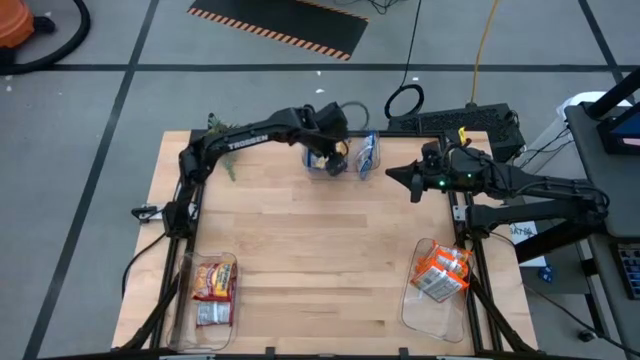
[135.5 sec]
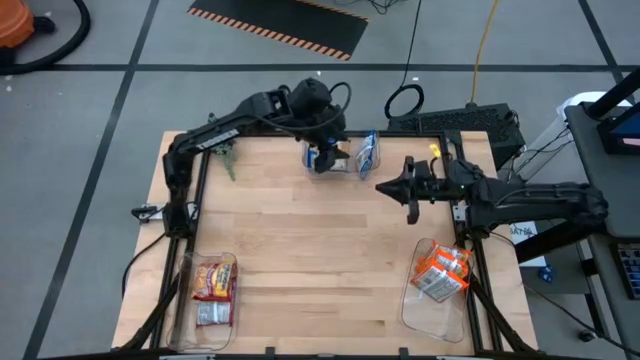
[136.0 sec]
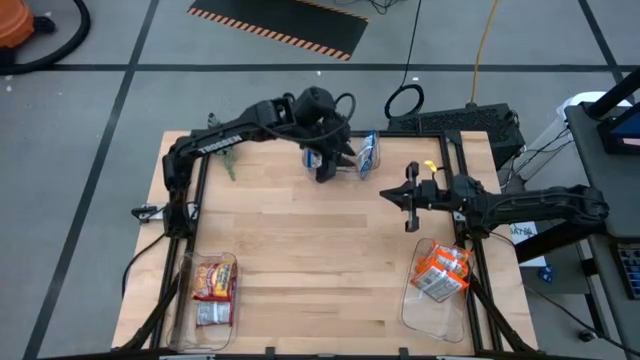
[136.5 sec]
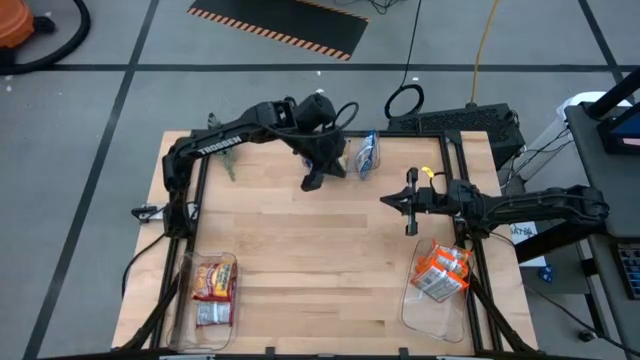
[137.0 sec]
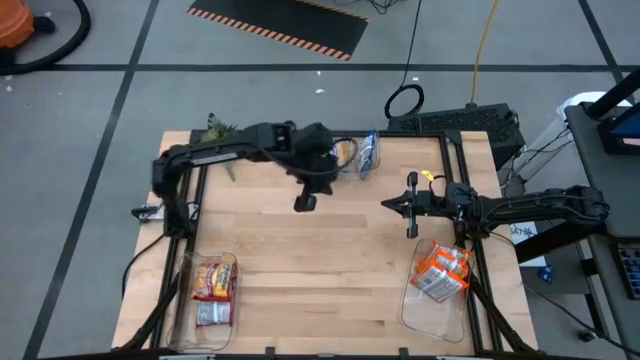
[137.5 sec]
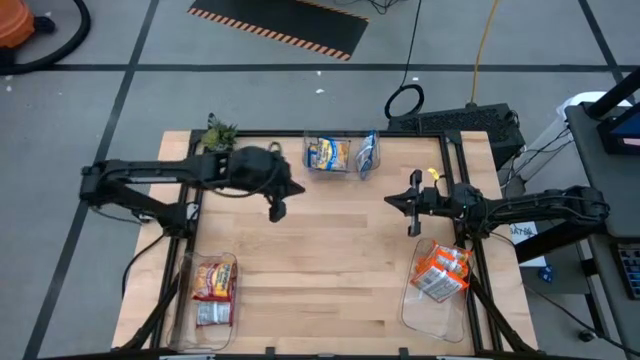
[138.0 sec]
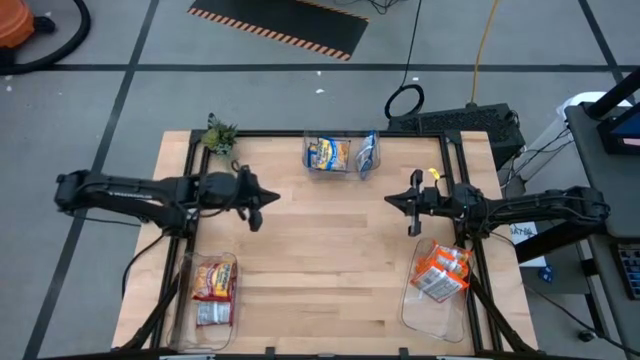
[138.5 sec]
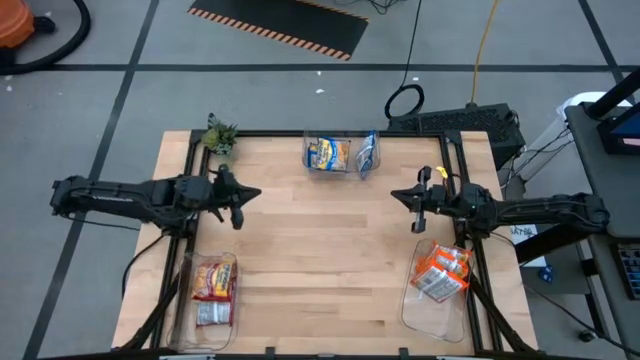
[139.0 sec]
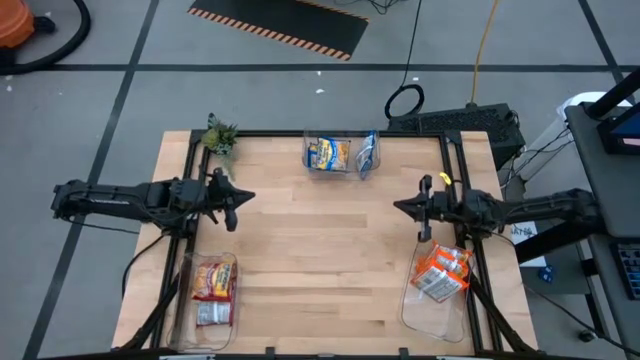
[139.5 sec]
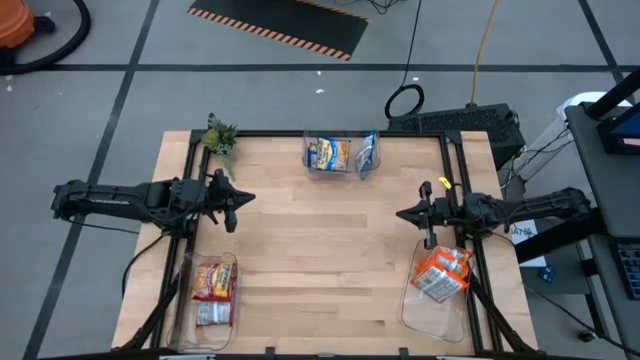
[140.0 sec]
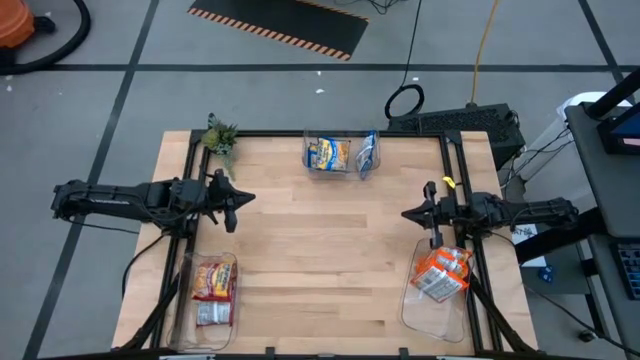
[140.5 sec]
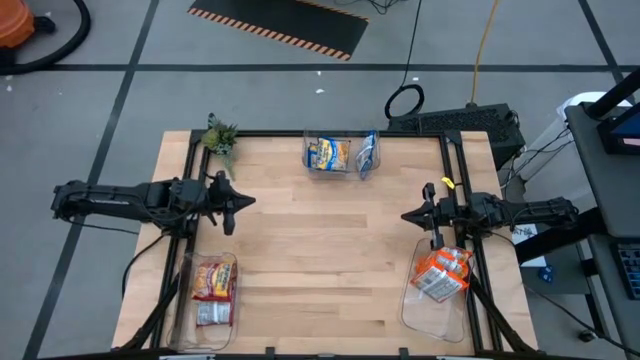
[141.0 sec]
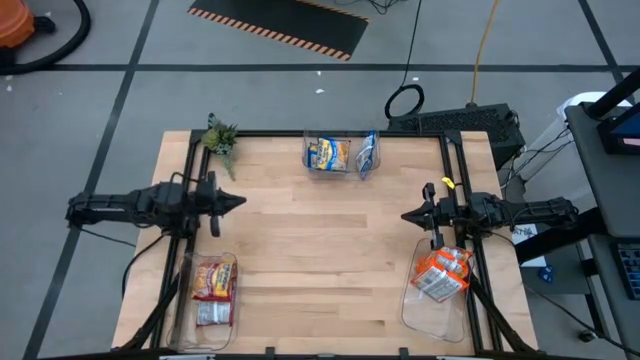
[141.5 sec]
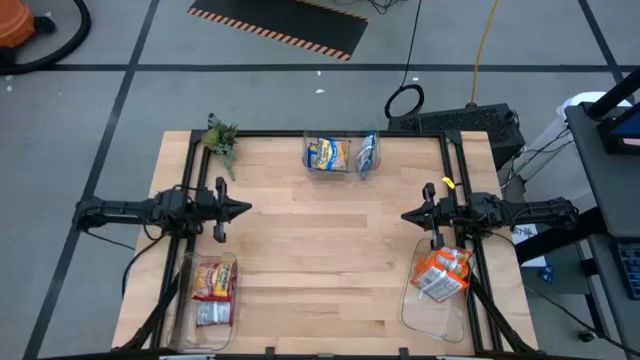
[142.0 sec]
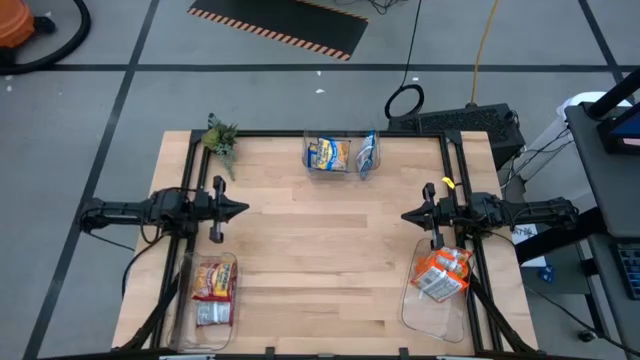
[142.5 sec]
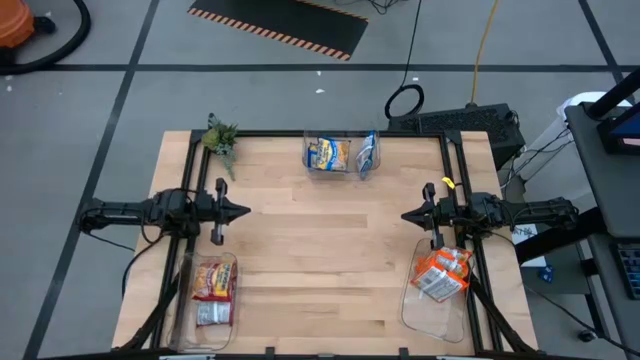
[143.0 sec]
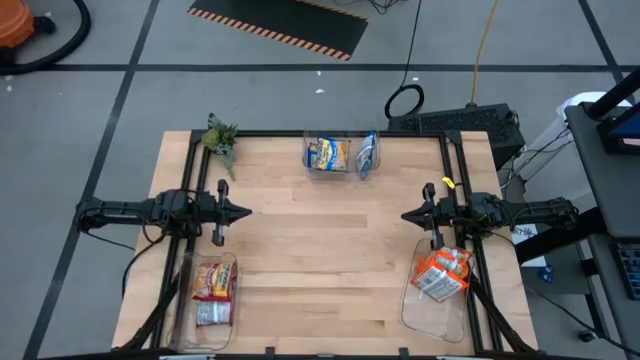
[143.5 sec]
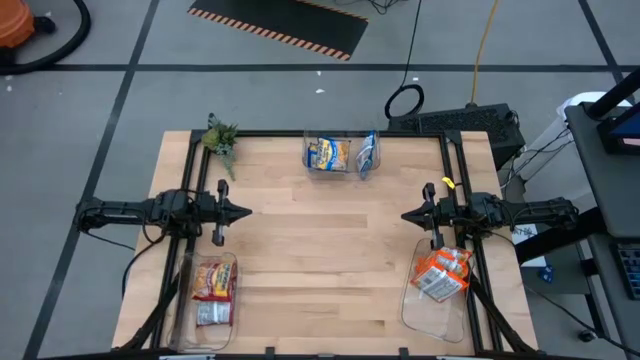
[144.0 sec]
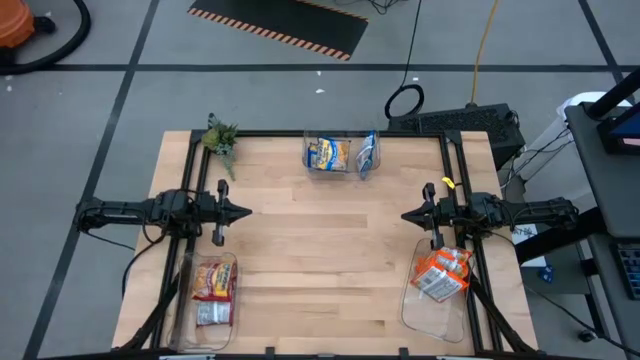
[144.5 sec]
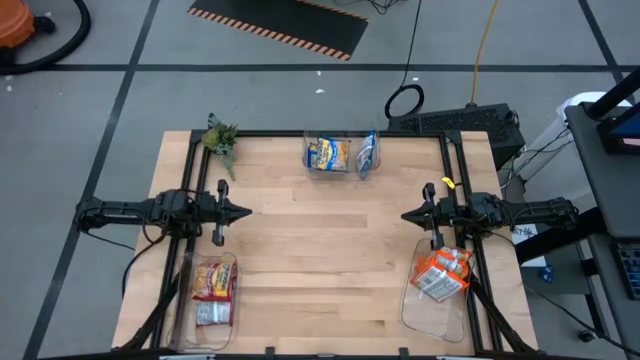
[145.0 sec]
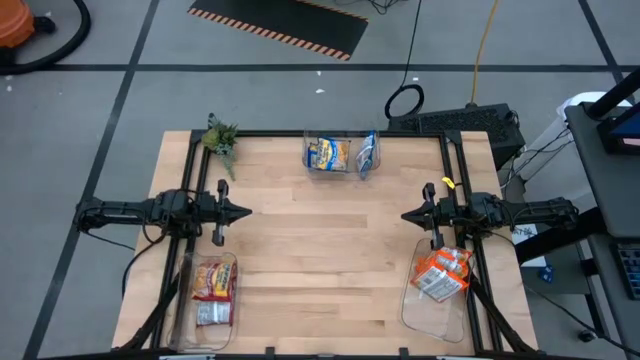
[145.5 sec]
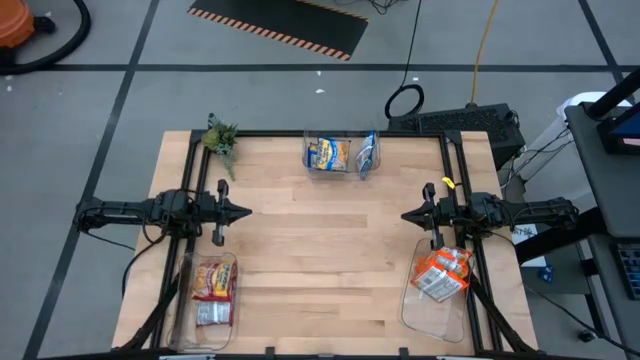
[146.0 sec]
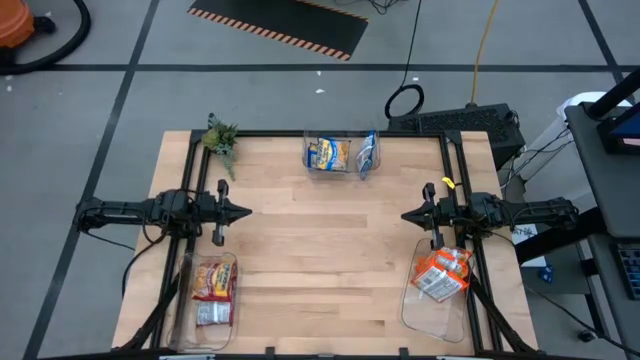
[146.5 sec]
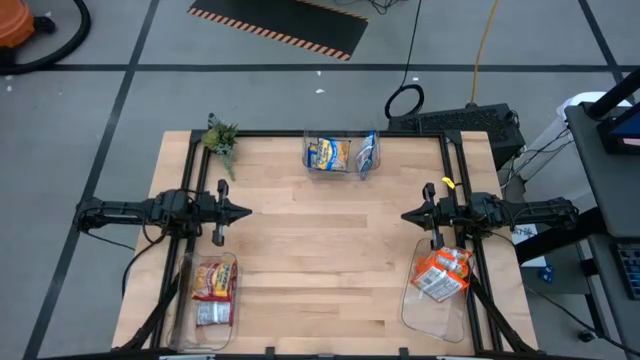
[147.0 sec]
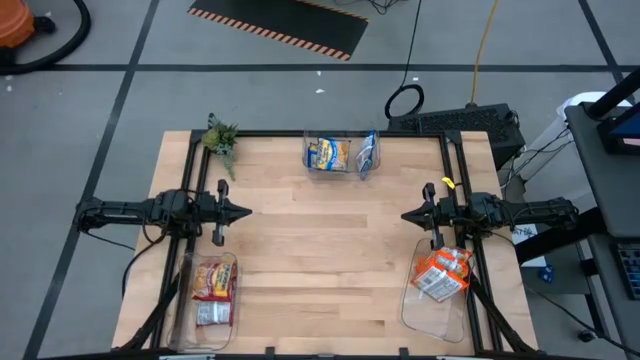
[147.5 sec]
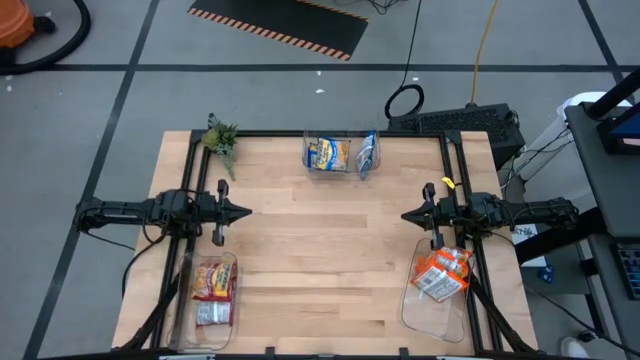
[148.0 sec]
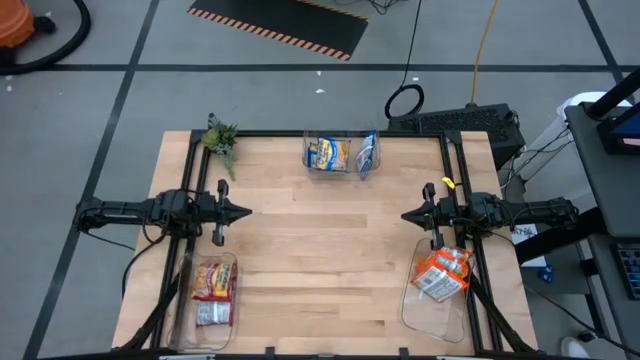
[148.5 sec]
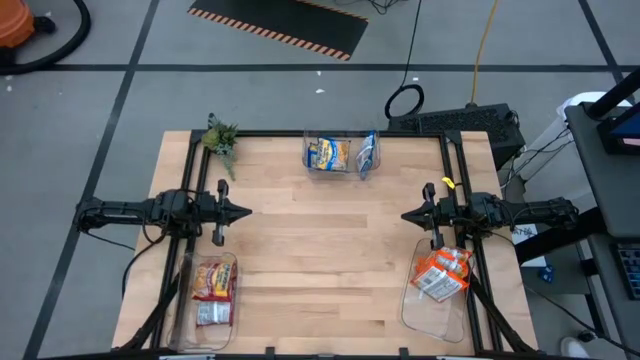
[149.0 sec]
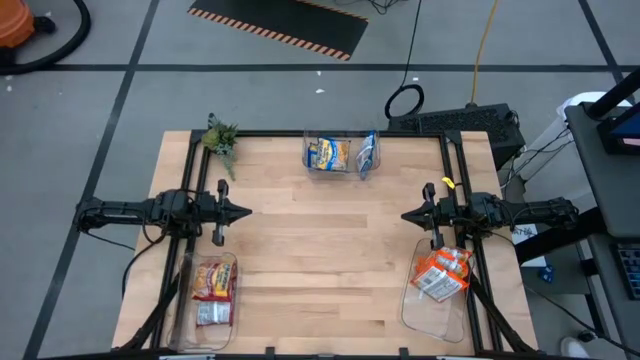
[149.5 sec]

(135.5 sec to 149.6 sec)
Task: Sort Maruchan noodles
Return to Home Position

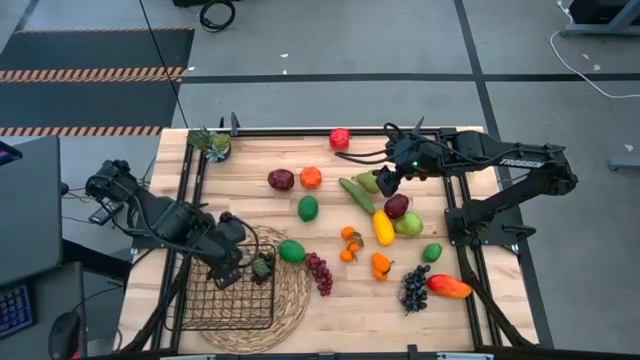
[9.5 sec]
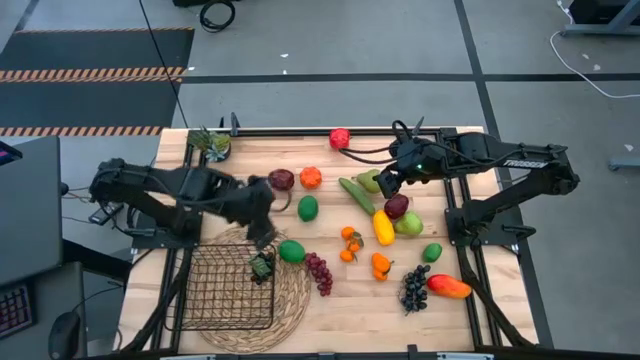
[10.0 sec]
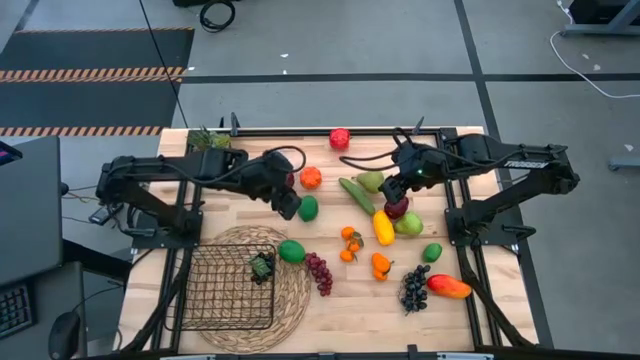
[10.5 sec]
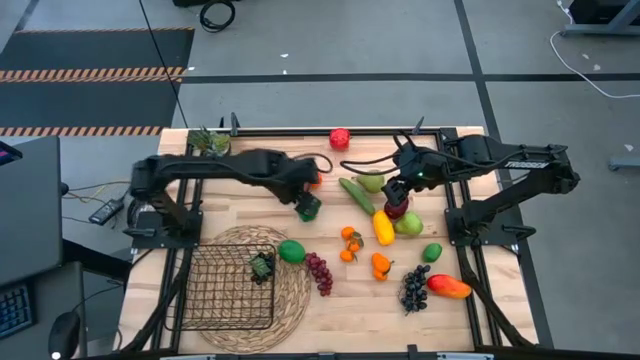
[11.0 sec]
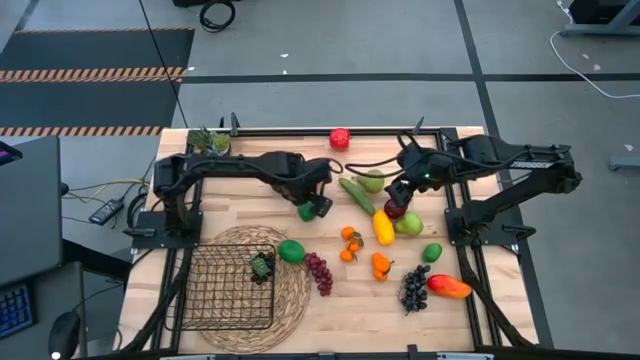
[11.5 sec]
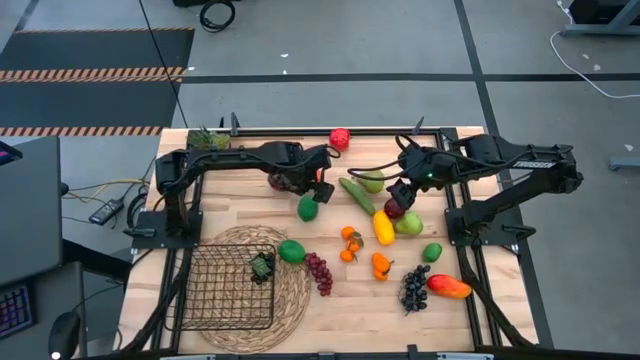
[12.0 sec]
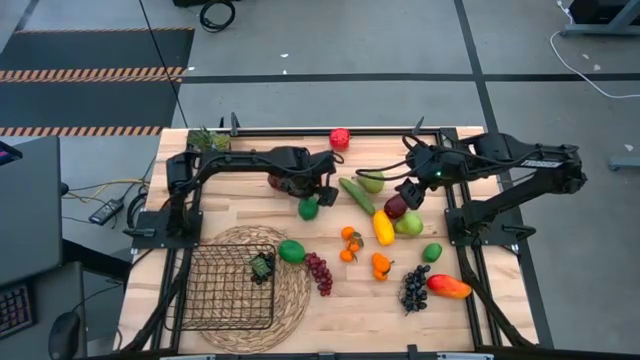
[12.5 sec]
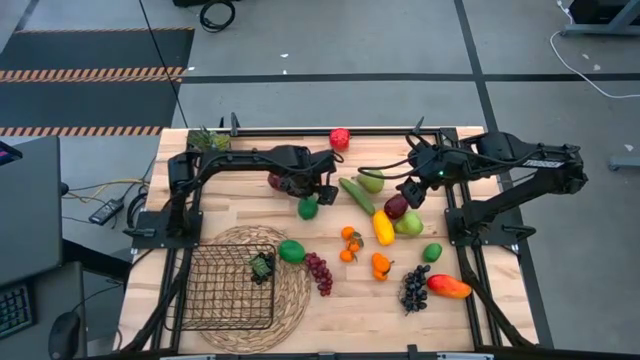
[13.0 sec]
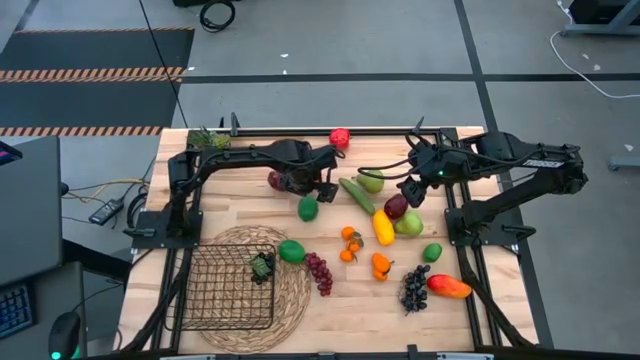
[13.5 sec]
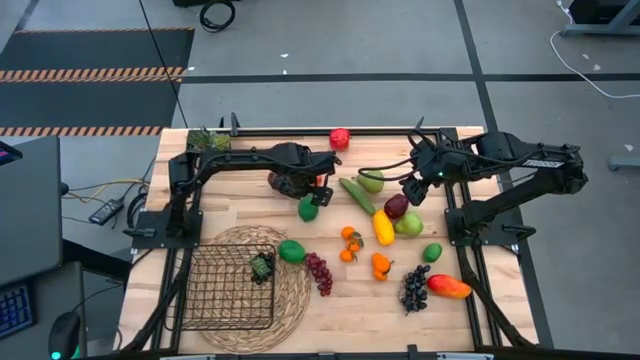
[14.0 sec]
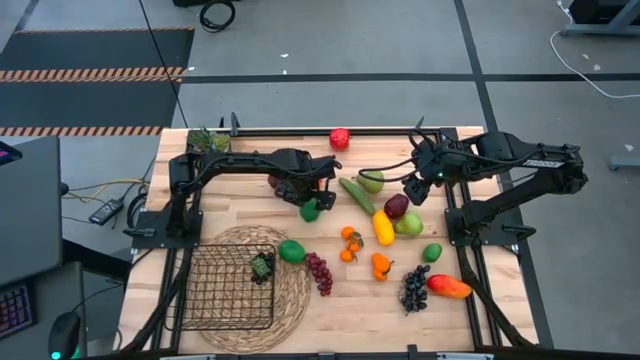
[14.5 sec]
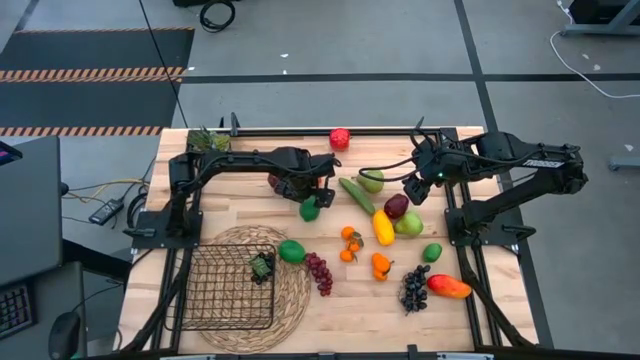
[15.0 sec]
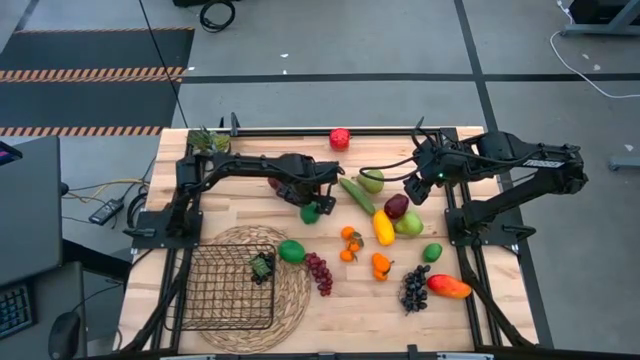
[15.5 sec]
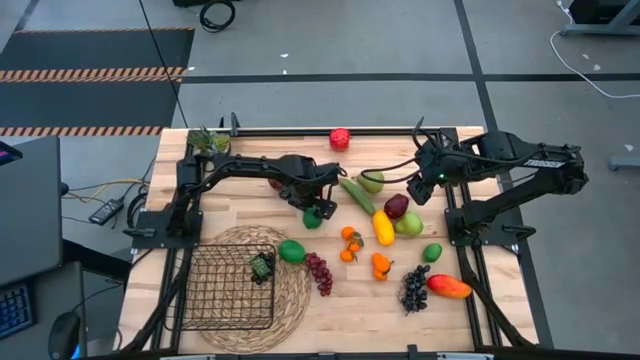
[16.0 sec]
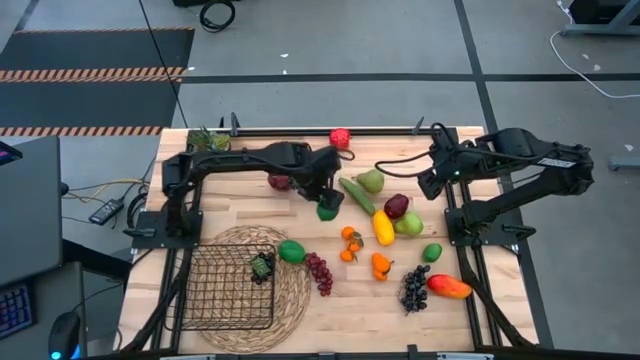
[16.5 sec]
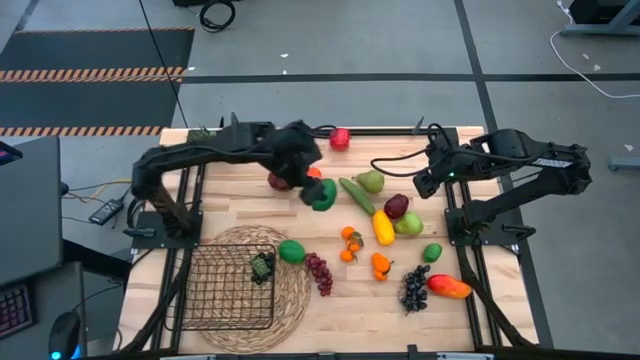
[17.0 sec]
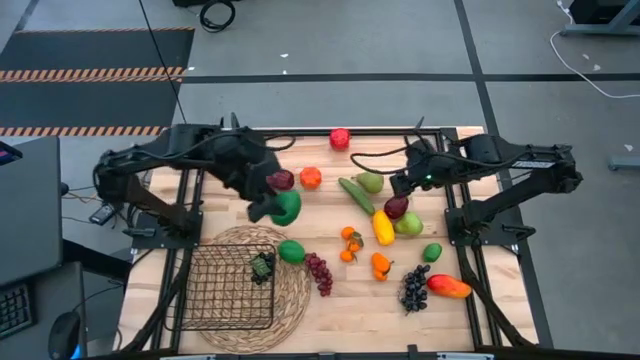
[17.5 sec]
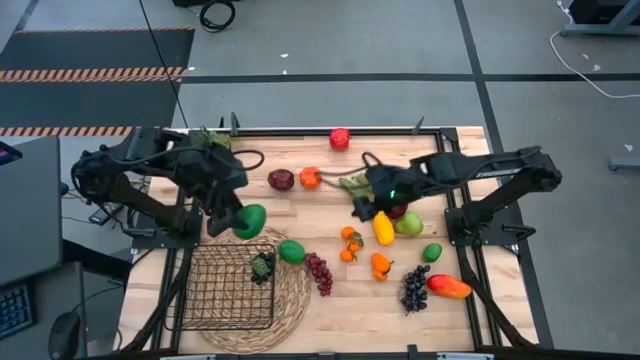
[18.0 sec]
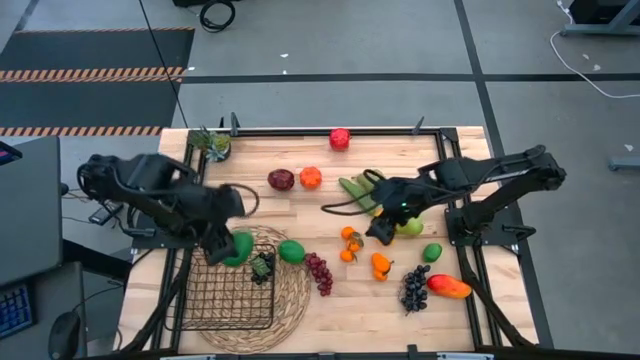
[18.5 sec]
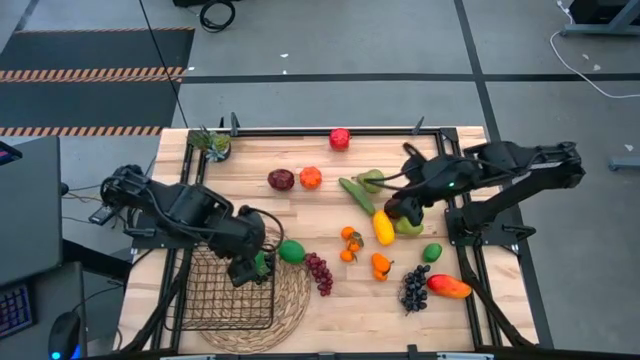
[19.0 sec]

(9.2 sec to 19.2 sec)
Task: Build produce basket
Put the top lime into the black wire basket
